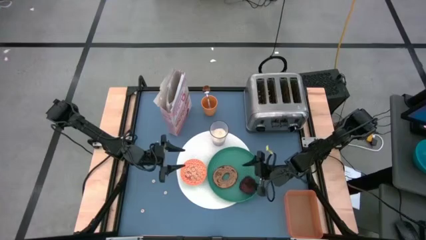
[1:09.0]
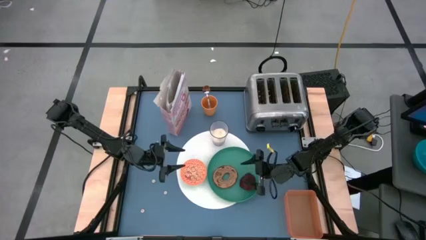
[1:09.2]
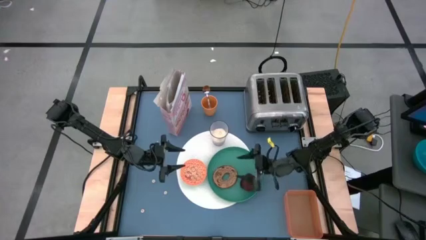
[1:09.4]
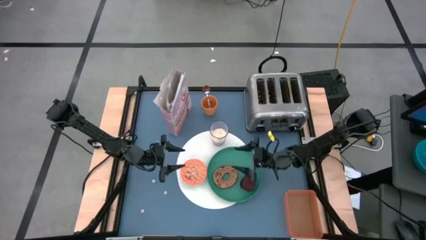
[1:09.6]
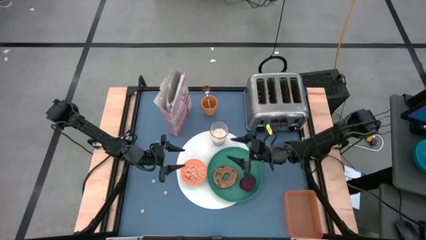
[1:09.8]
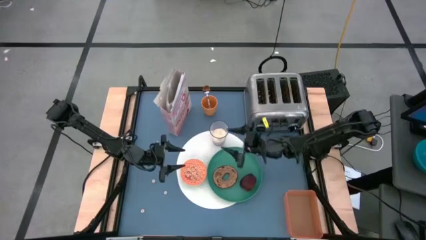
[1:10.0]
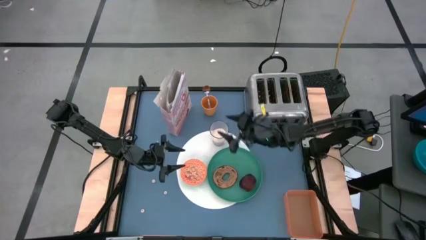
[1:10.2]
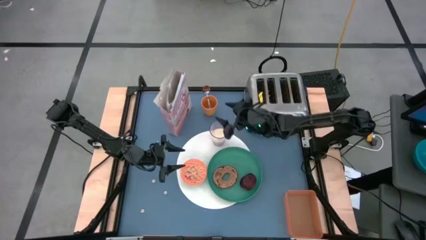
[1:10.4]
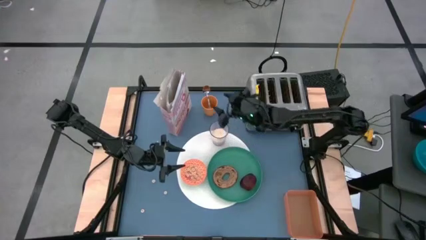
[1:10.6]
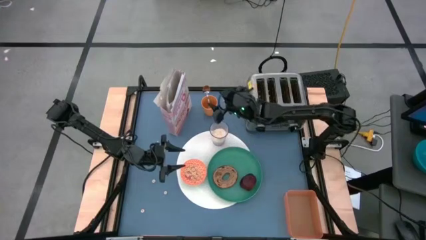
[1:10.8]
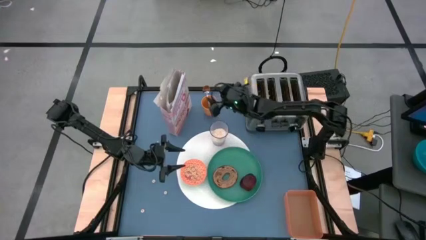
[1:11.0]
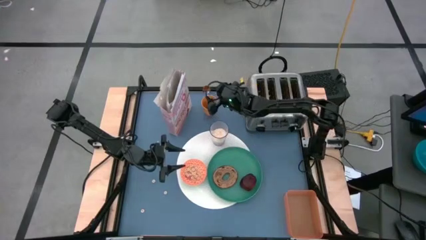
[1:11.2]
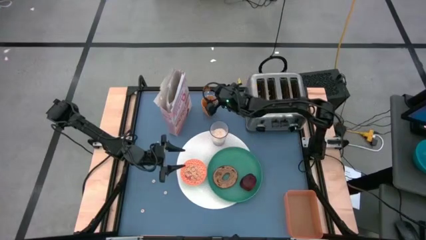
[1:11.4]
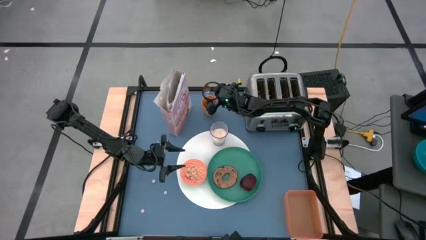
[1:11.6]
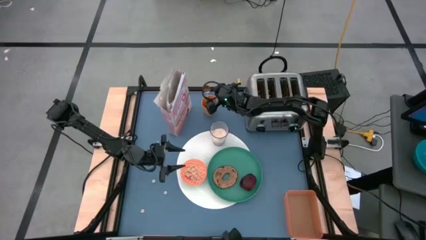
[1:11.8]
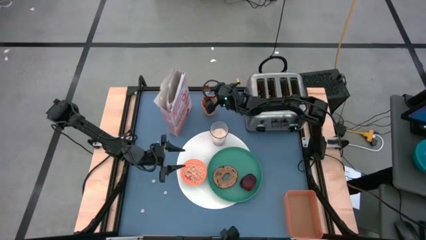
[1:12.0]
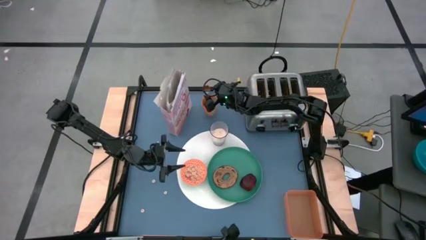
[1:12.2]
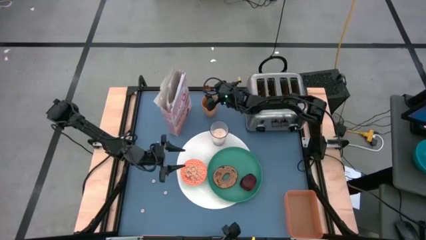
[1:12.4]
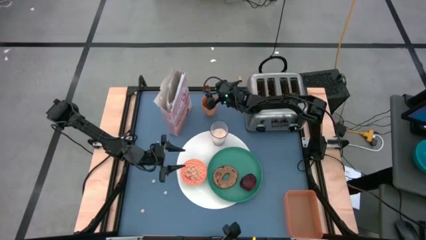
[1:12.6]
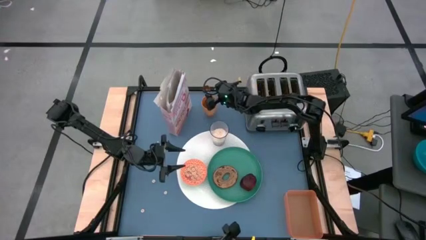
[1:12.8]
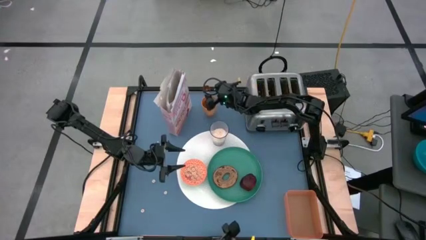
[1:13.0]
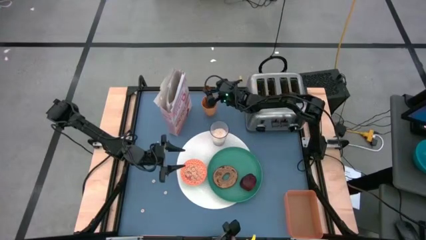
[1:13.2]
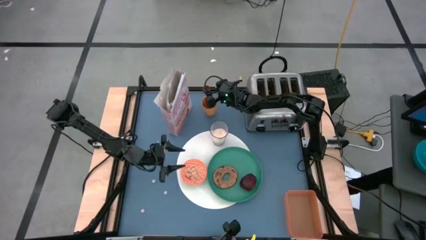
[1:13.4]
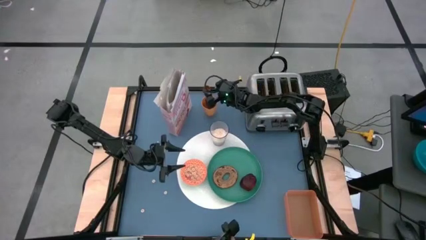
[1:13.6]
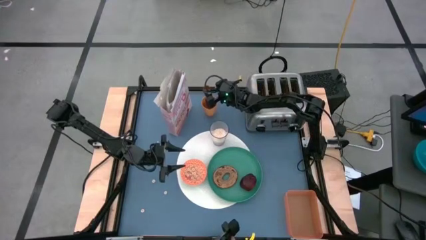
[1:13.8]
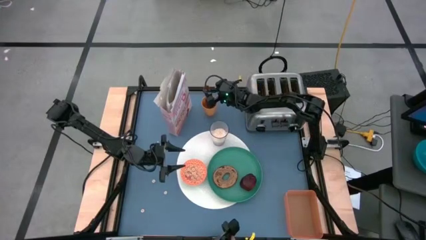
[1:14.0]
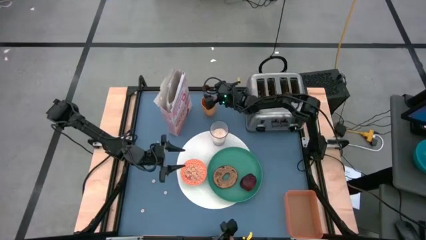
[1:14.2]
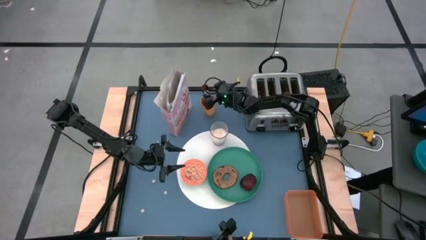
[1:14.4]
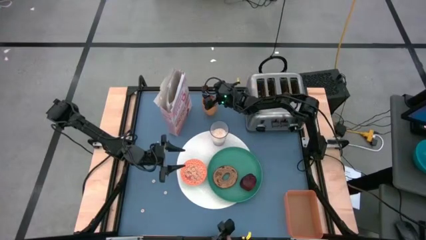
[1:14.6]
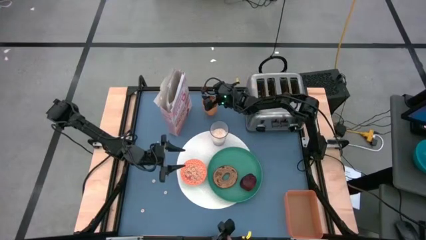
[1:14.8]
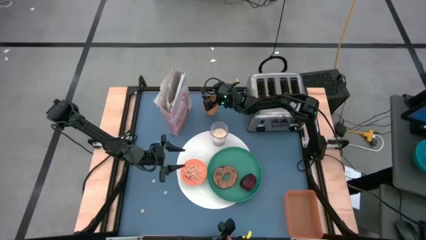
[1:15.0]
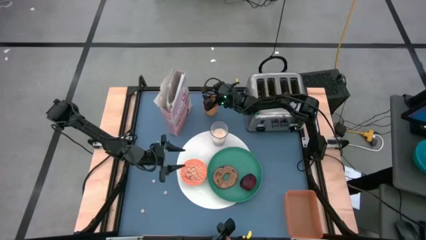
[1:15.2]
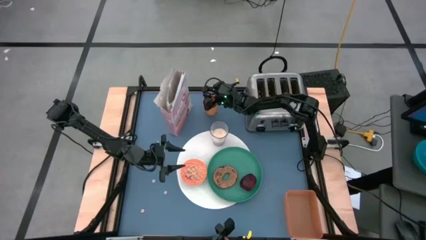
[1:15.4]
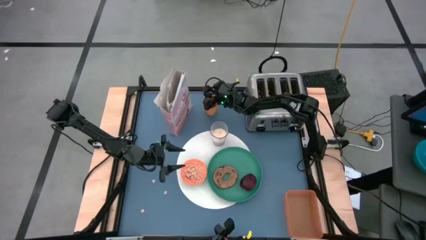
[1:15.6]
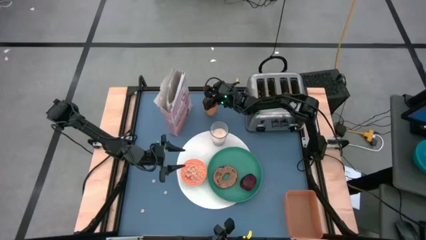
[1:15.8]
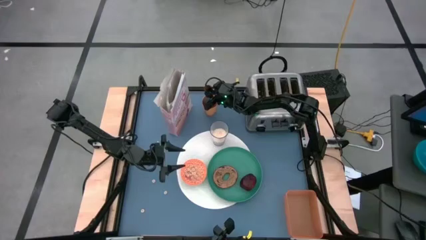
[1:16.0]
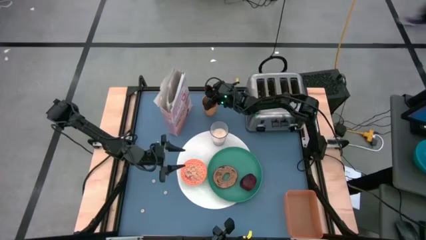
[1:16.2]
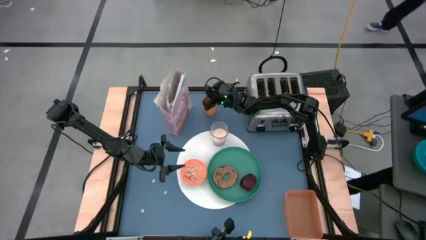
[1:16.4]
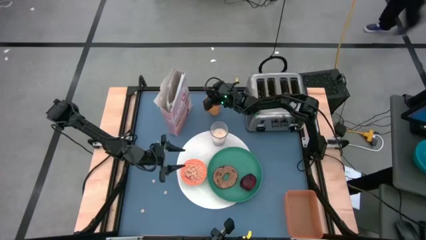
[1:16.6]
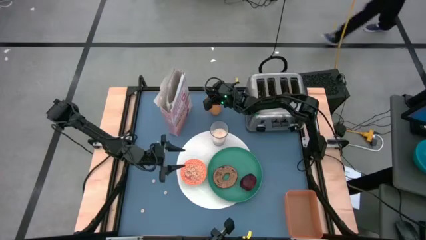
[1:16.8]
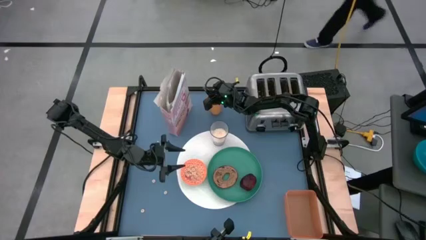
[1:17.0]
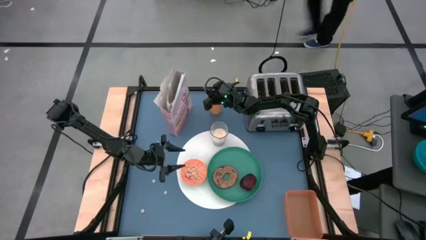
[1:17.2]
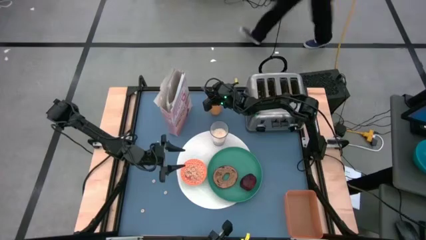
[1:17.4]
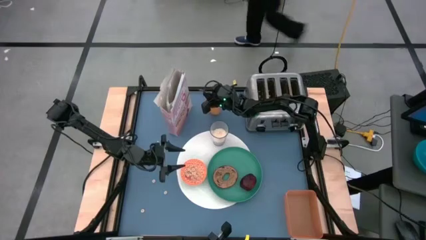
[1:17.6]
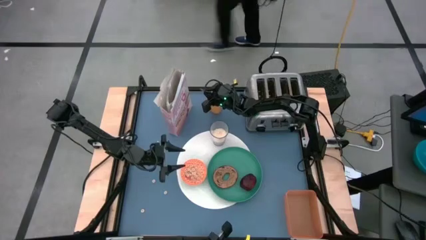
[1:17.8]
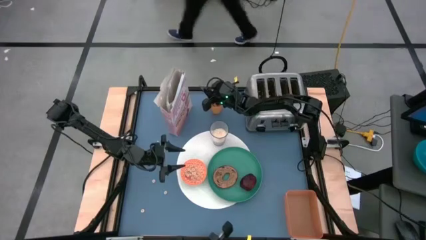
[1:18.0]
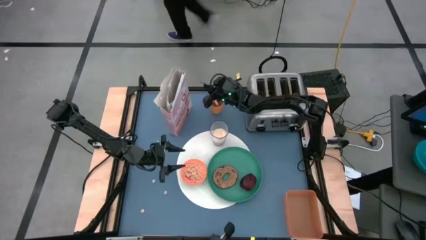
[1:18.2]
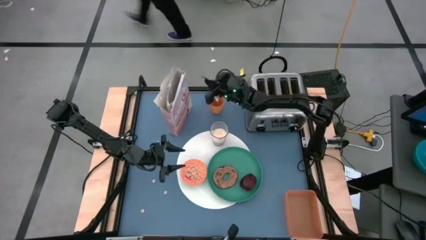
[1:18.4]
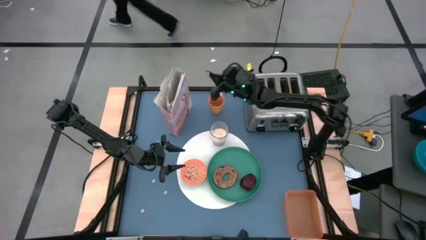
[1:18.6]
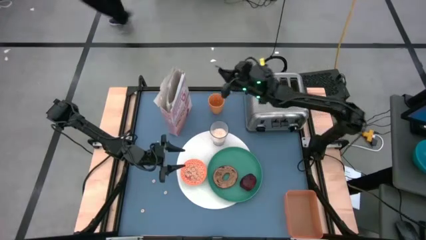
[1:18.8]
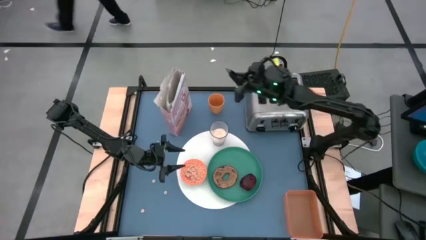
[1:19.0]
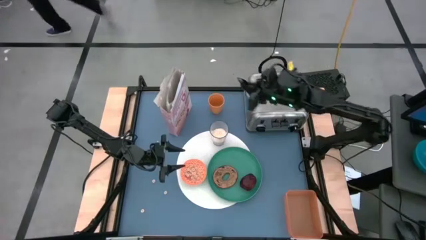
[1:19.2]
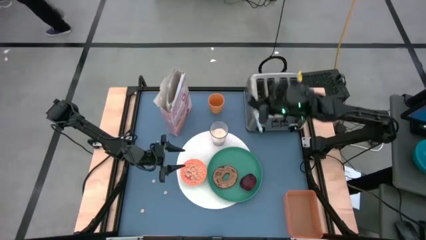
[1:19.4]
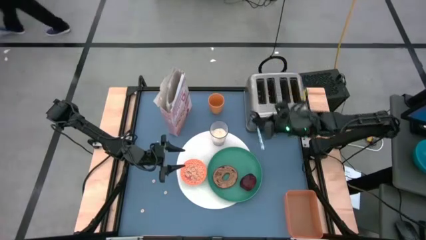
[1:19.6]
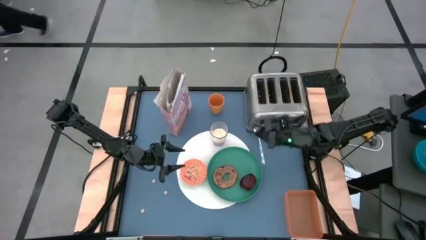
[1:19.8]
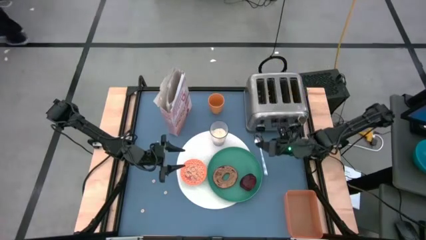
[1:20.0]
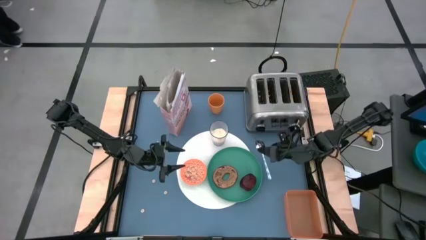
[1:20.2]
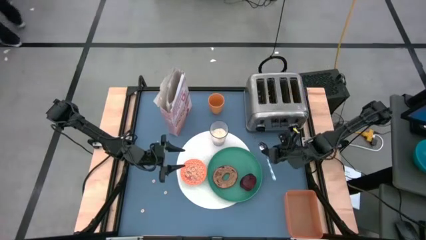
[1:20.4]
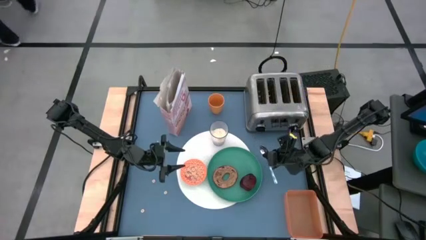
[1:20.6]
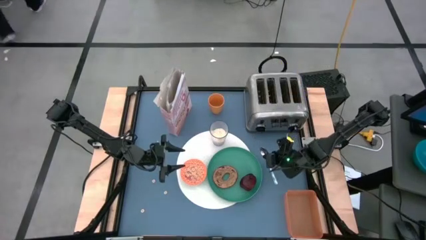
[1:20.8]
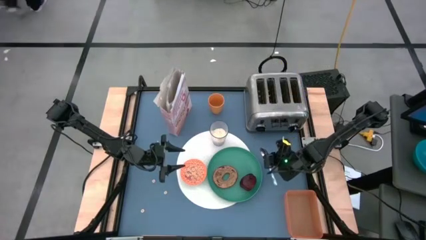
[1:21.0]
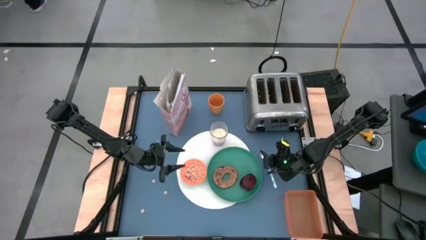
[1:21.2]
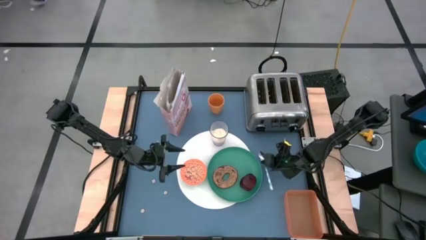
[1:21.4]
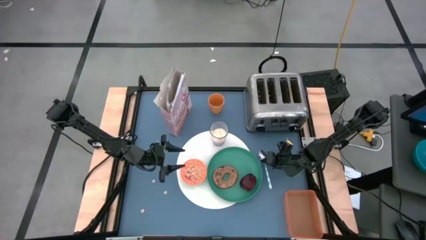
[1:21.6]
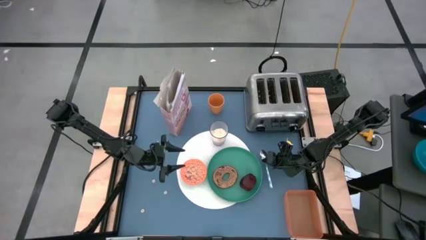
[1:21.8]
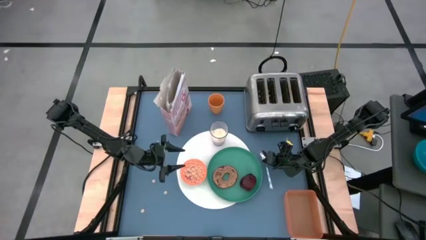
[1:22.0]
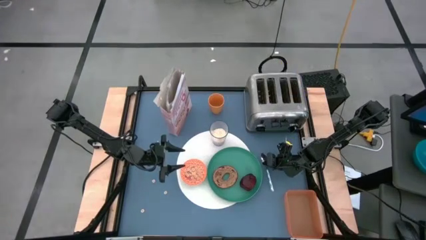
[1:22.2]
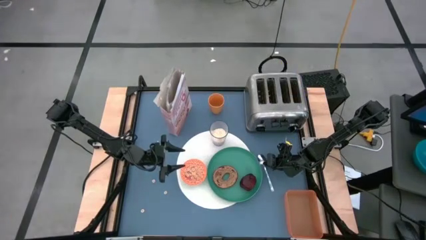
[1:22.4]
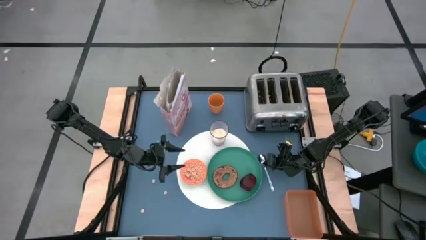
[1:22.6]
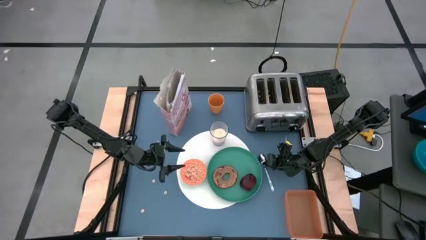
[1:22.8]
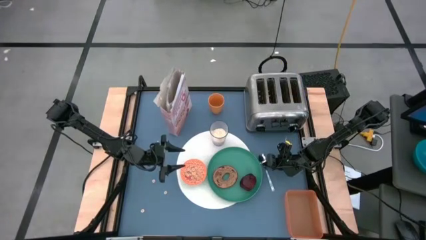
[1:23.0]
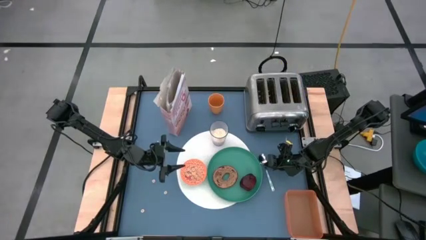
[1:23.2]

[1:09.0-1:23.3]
Task: Arrange a breakfast setting
Put the white spoon on the table to the right of the green plate

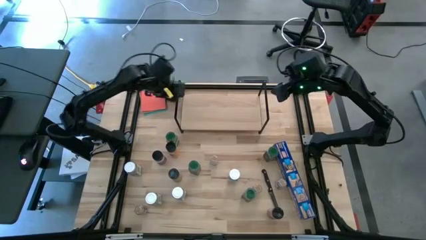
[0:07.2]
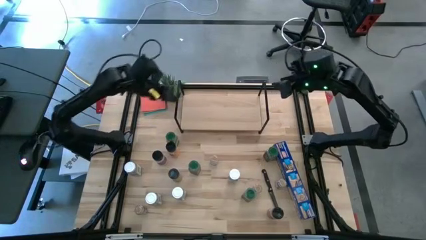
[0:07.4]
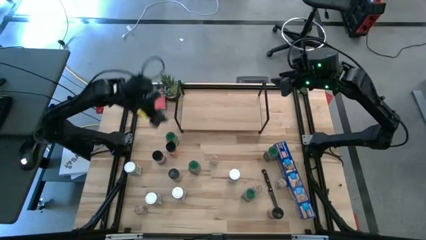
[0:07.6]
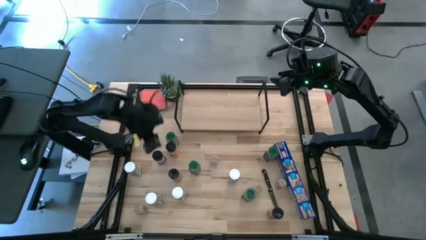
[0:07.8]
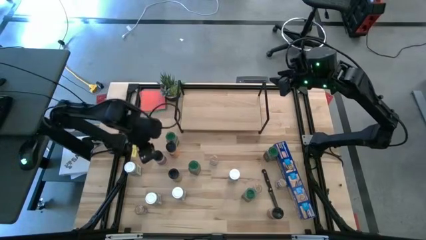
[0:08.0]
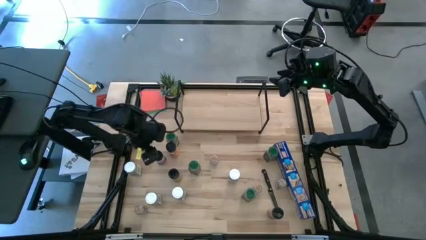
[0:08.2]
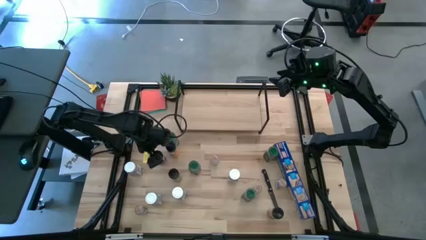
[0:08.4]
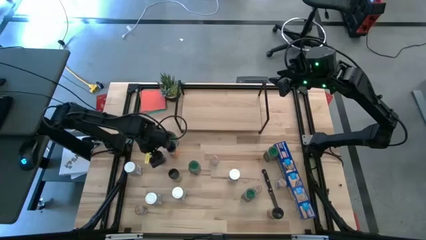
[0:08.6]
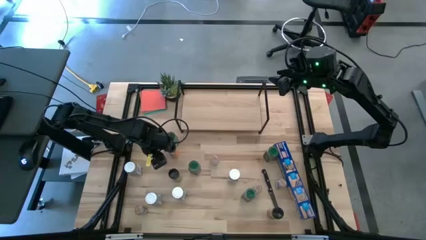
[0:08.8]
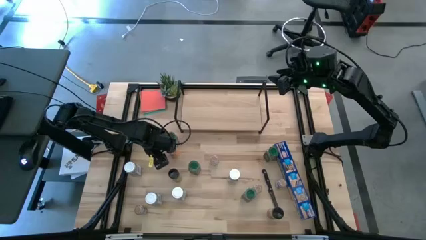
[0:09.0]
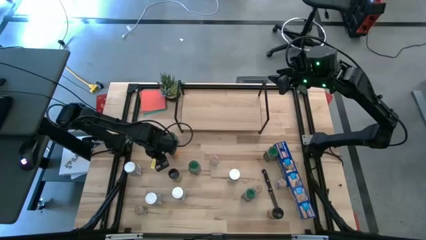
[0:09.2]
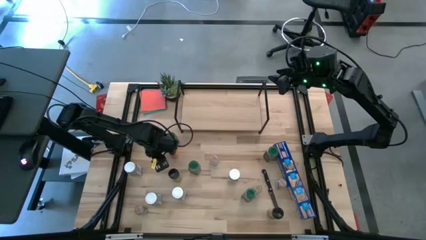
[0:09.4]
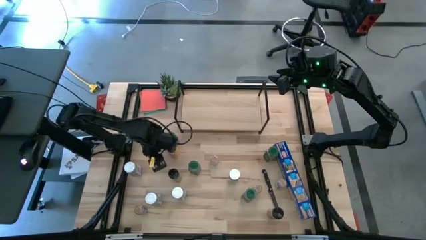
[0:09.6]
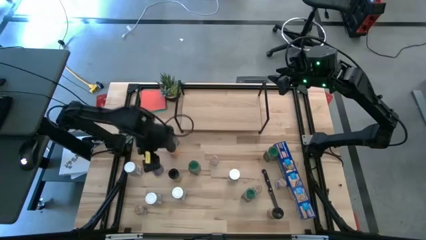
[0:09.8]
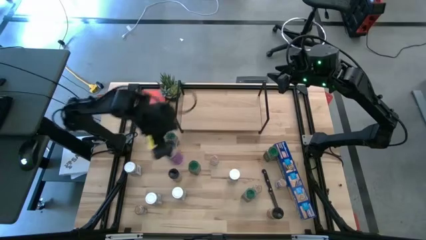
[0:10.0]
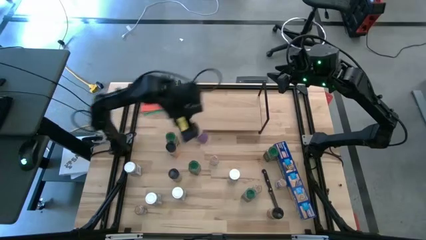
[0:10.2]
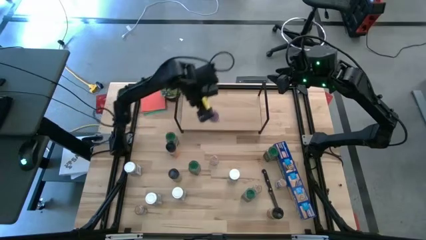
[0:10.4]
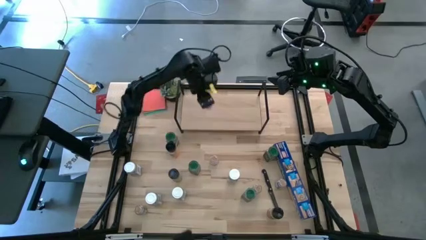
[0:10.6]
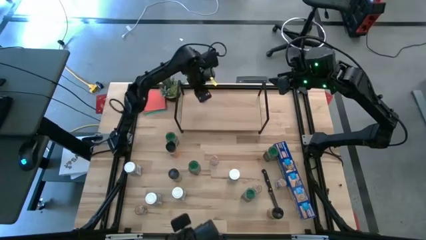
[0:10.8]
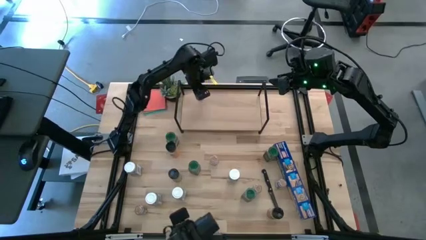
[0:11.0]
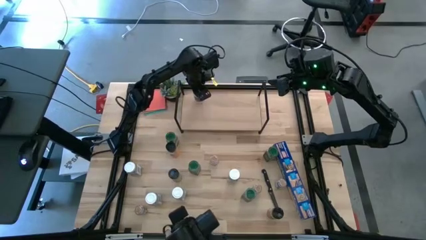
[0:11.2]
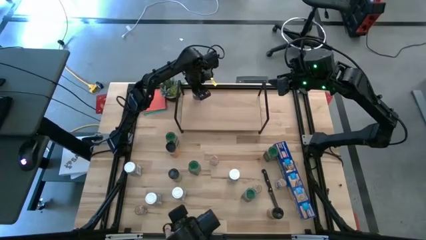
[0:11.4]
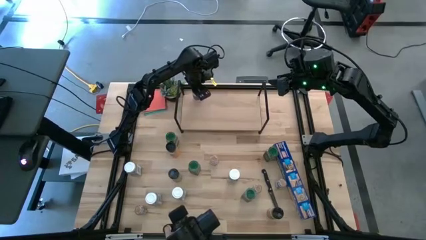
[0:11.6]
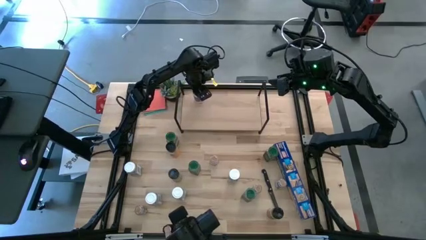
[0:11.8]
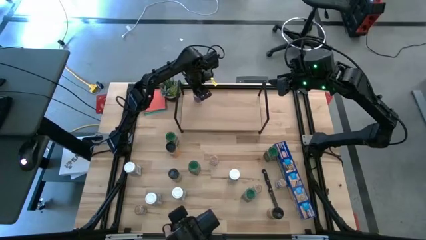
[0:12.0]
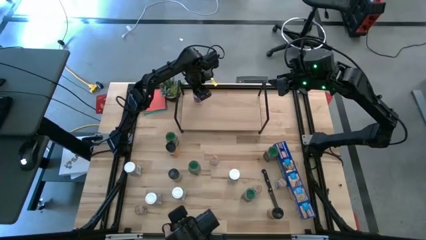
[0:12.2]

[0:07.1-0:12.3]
Task: Shelf spices
Put the black seasoning bottle on the shelf
